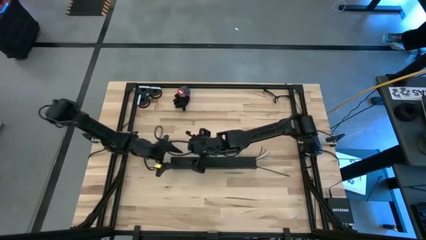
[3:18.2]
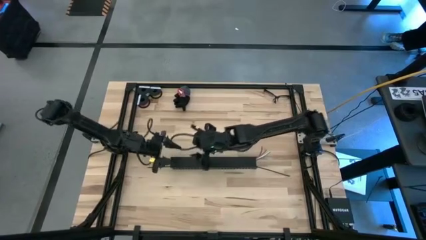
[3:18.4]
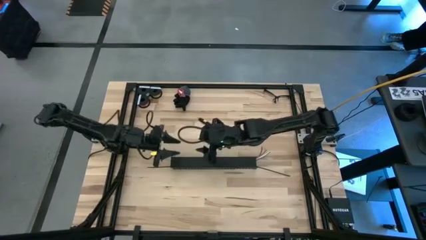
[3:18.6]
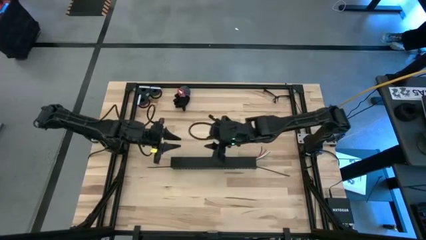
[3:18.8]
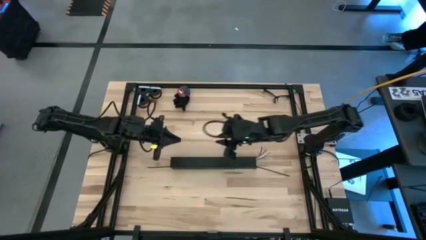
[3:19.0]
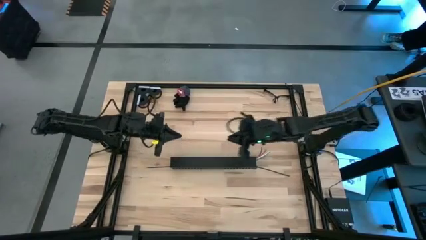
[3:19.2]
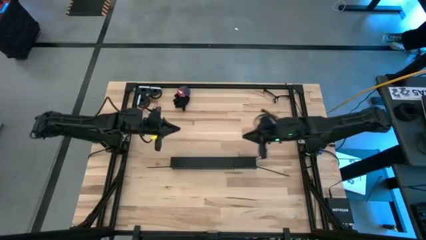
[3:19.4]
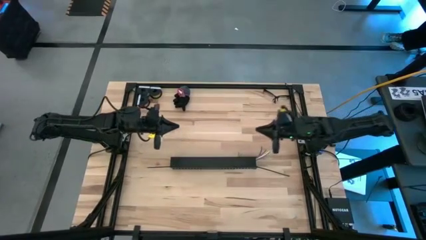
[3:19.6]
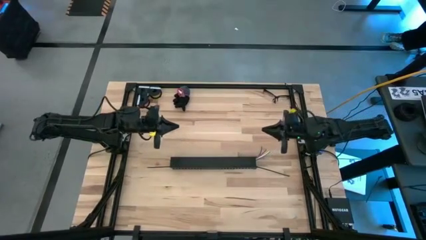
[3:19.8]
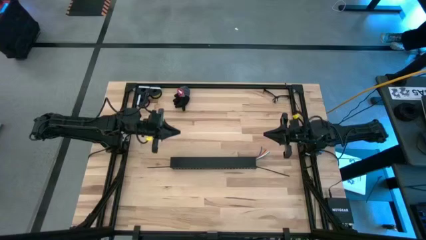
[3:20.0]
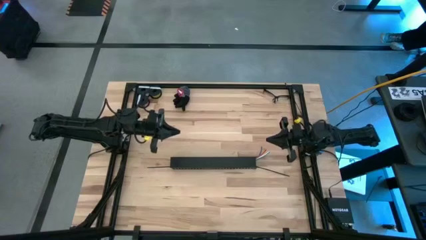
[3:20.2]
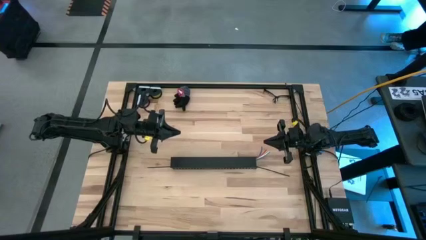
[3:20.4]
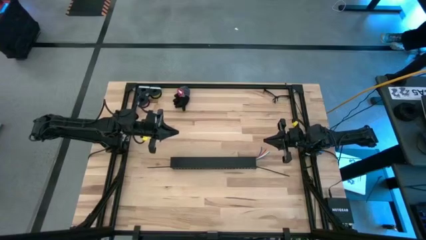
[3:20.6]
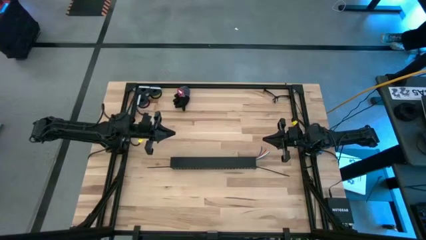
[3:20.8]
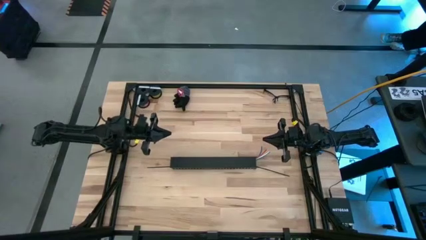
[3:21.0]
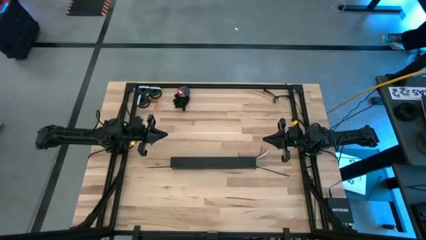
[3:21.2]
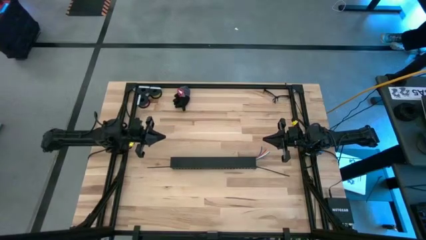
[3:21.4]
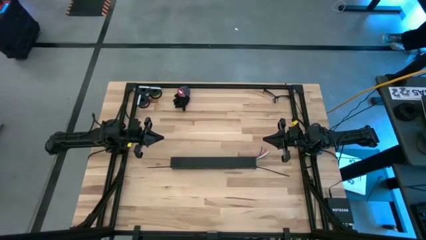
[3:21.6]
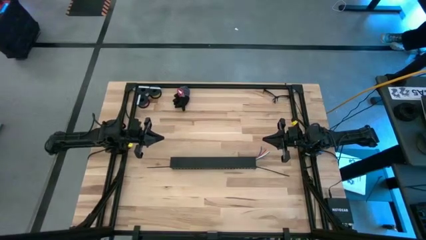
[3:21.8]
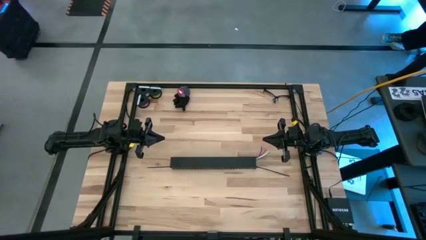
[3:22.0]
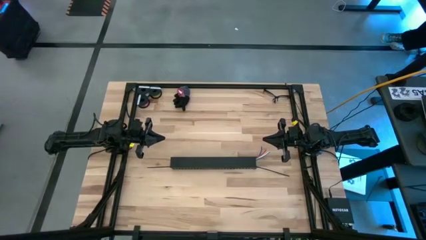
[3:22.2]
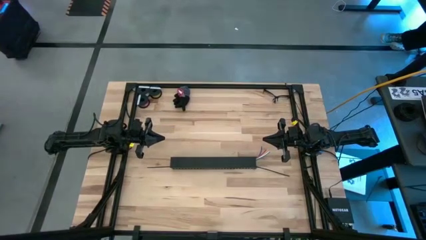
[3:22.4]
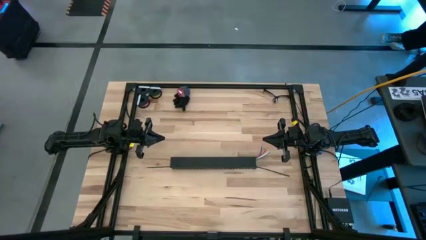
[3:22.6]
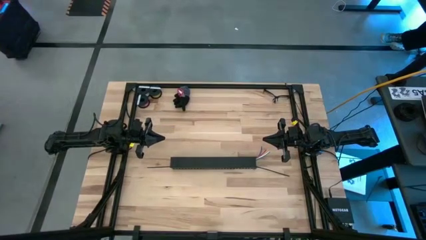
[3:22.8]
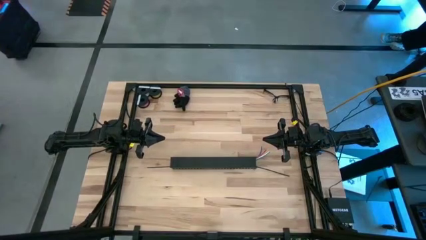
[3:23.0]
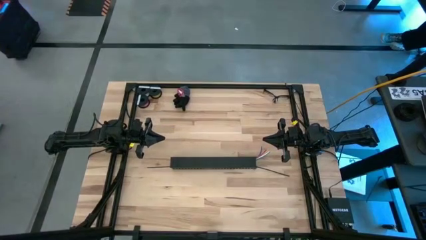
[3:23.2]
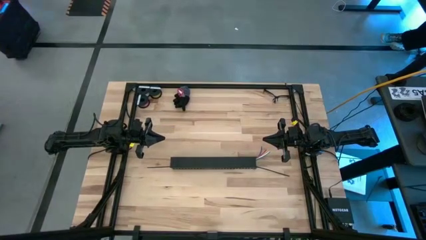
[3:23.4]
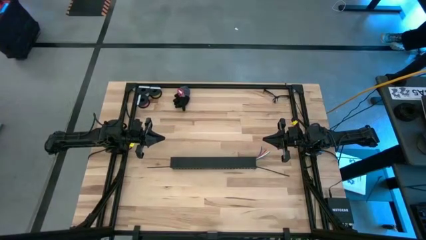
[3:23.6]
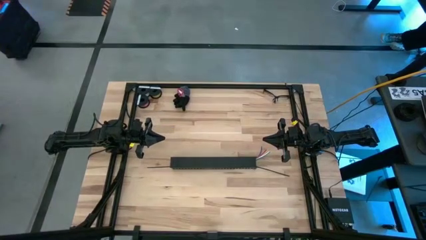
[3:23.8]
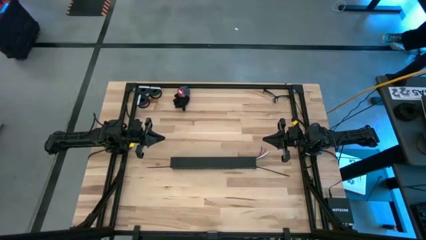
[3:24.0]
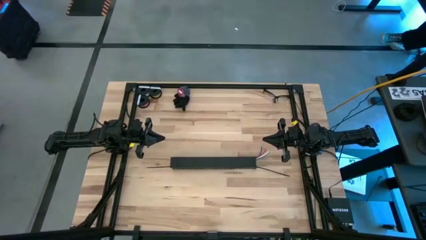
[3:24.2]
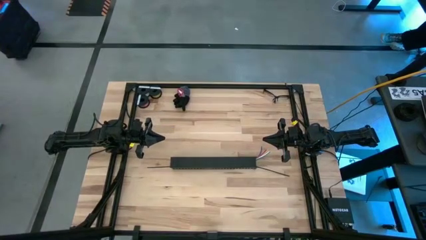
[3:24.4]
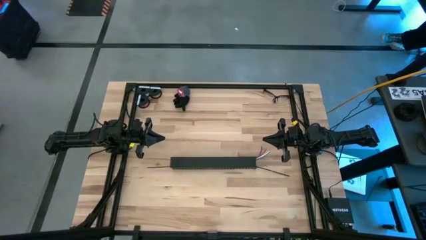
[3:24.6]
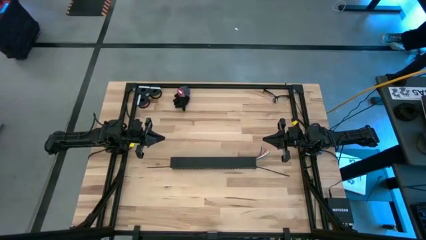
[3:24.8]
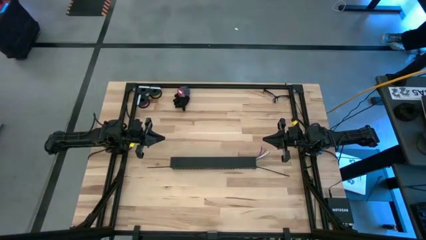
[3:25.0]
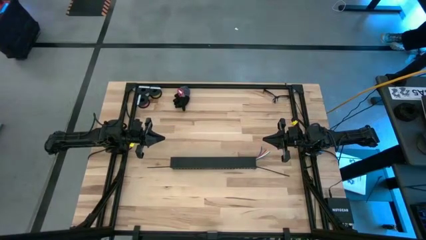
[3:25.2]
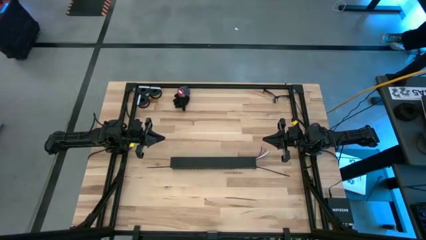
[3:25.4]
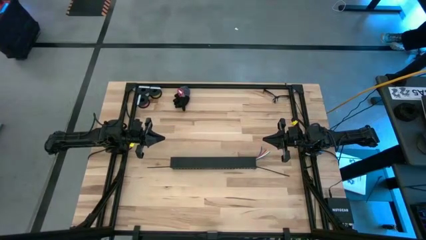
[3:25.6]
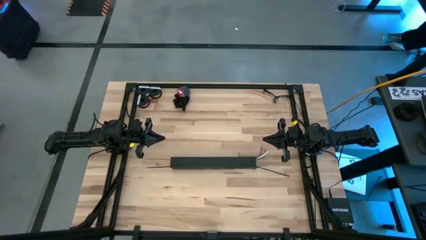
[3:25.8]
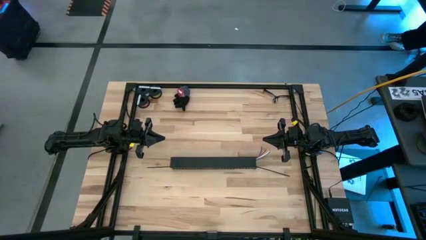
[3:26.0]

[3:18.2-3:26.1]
Task: Ziptie cables
Return to Home Position
